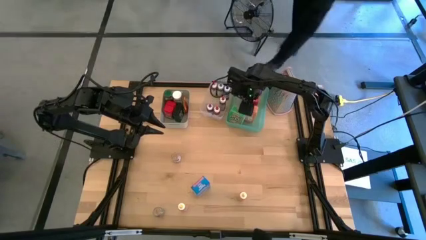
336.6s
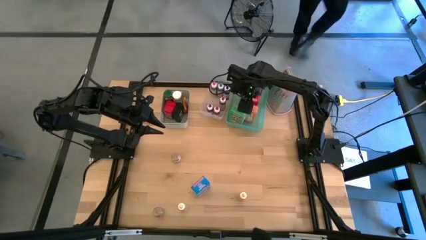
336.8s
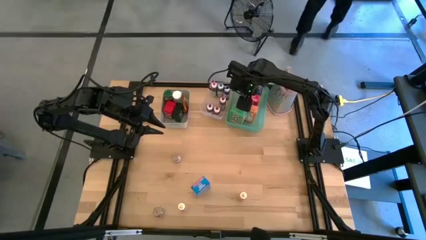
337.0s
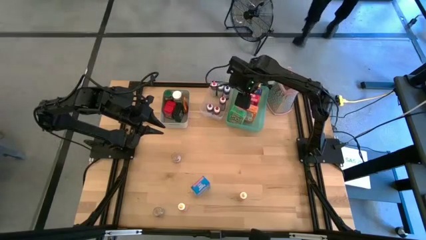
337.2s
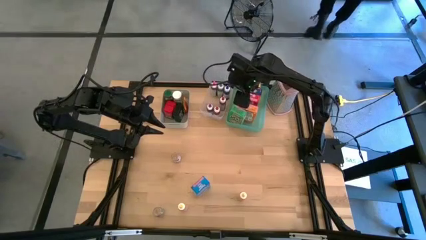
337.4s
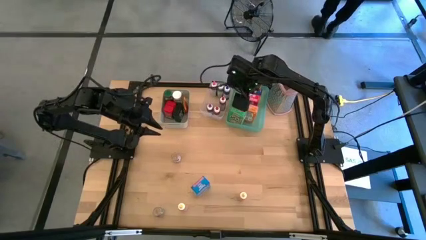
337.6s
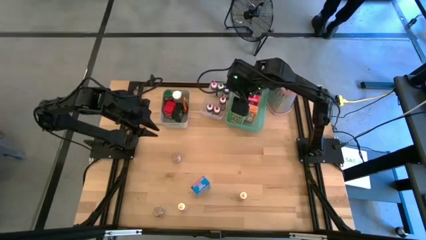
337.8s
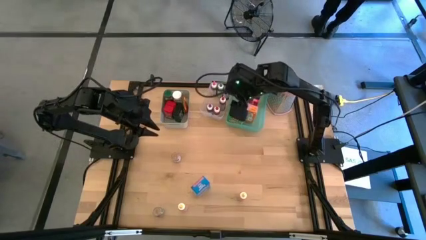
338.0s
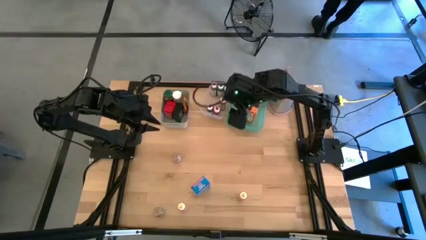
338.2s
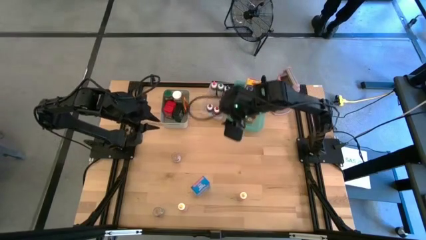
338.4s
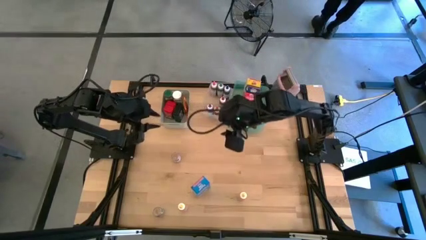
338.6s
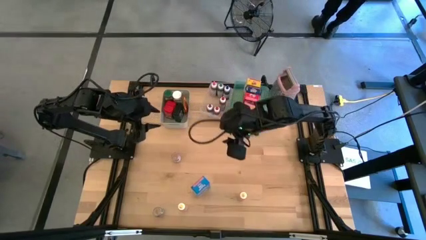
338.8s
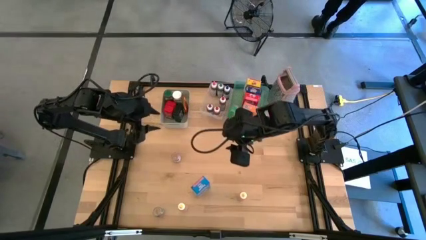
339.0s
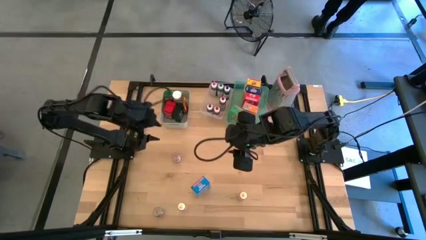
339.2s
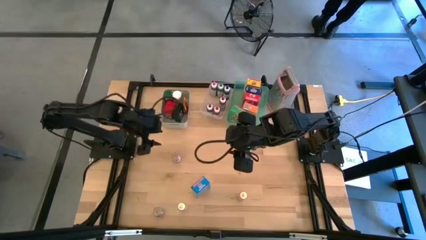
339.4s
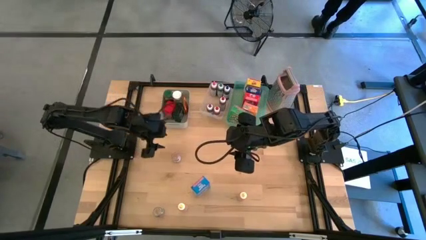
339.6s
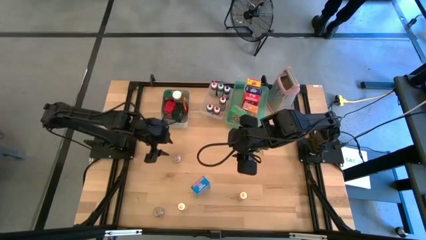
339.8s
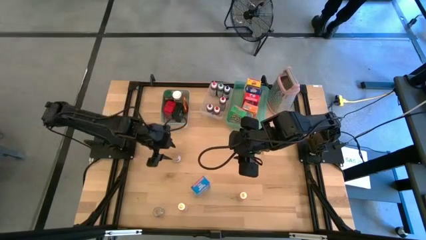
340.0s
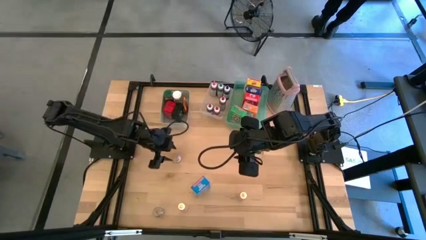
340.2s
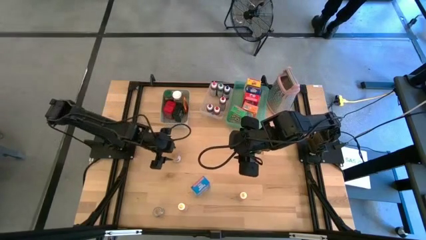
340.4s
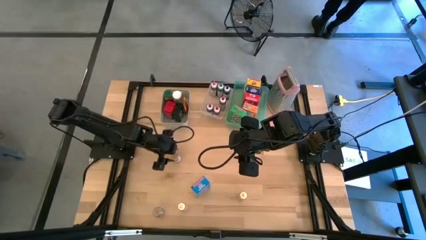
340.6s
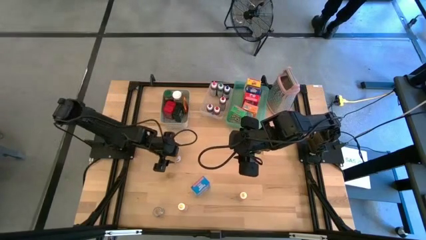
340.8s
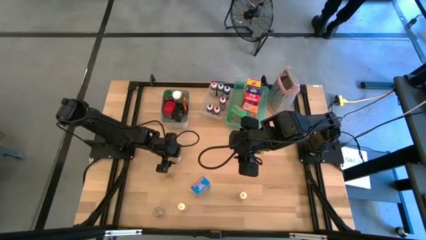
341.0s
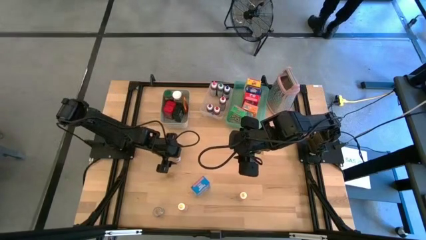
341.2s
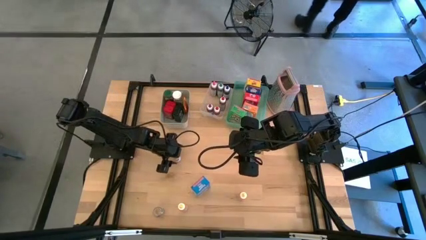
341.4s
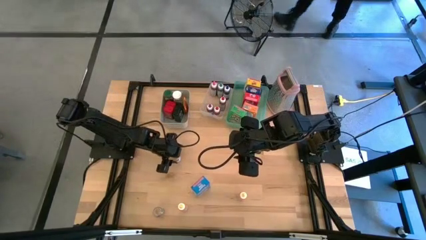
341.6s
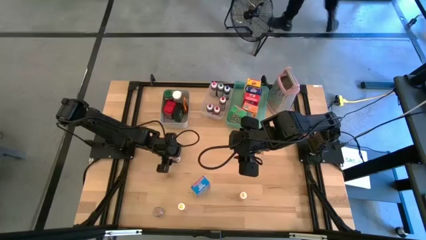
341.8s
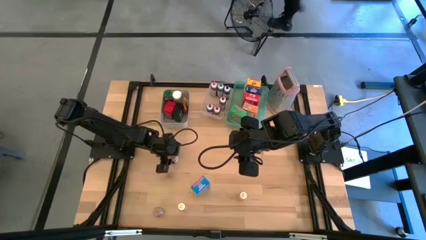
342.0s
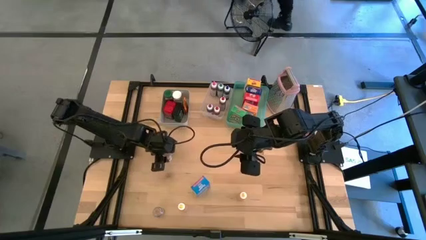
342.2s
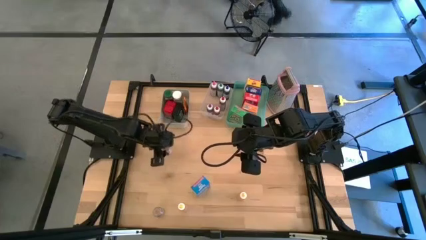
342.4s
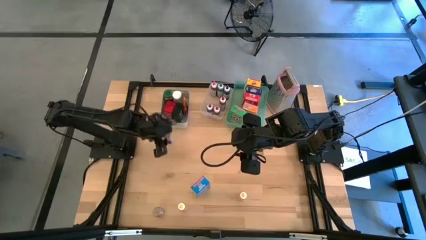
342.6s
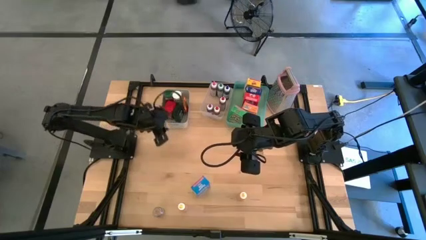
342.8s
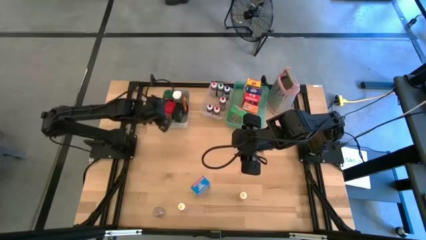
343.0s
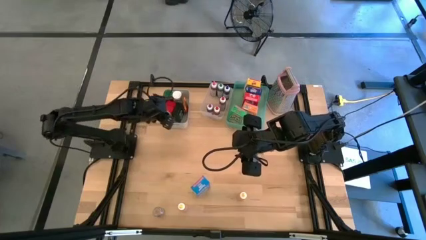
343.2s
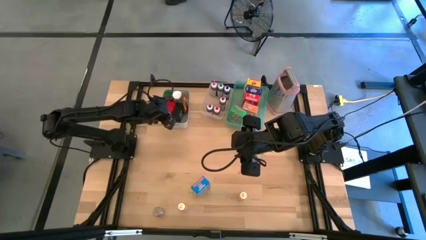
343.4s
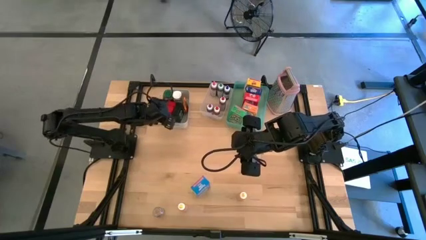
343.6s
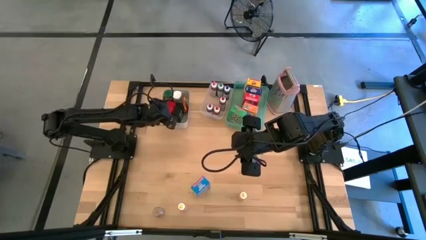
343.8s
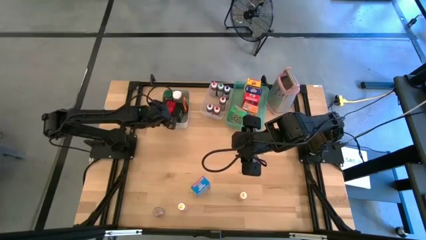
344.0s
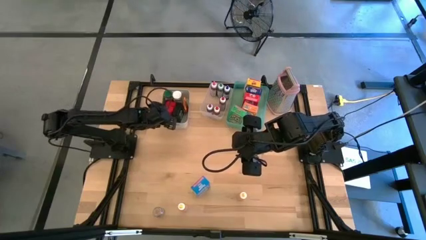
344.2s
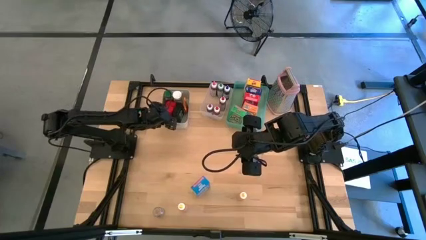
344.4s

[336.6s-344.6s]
Task: Pick & Place Kitchen Items
Put the top brown seasoning bottle into the gray bin

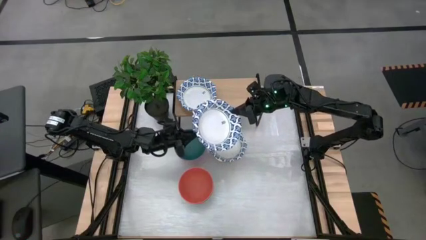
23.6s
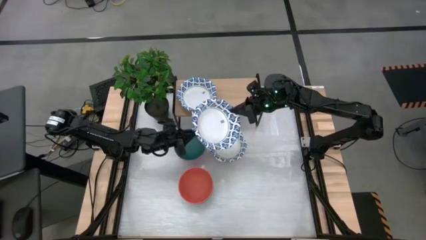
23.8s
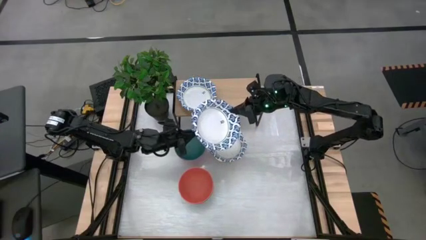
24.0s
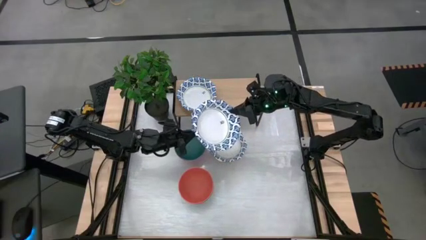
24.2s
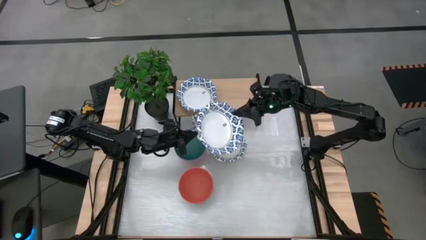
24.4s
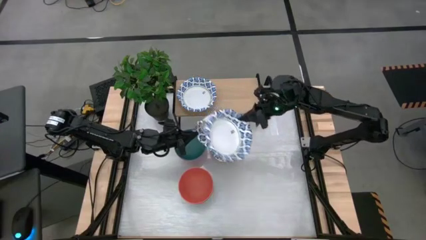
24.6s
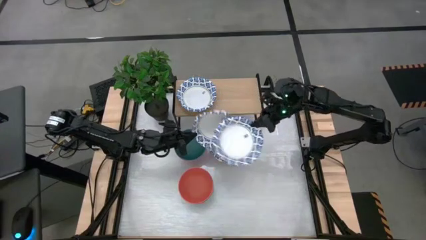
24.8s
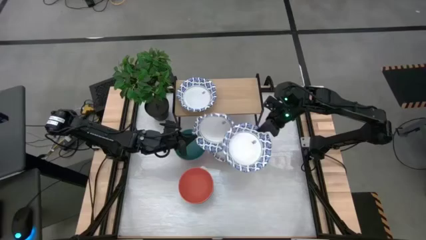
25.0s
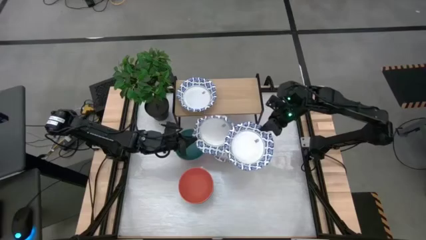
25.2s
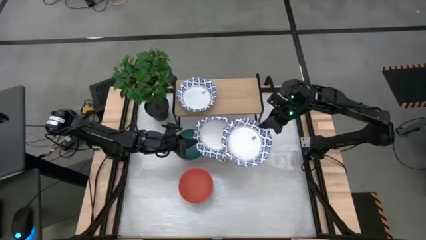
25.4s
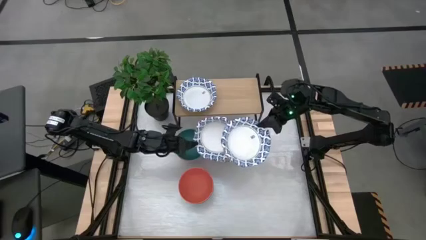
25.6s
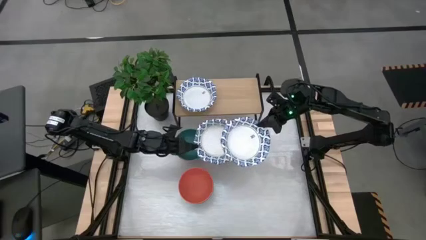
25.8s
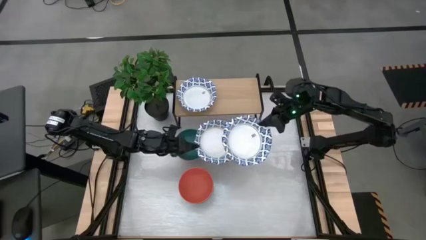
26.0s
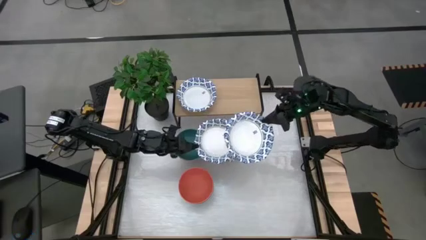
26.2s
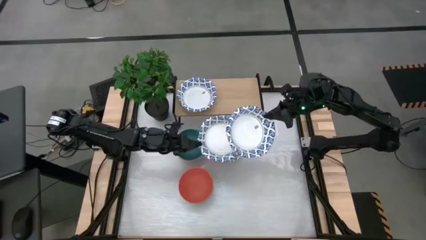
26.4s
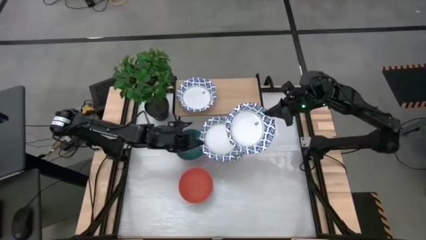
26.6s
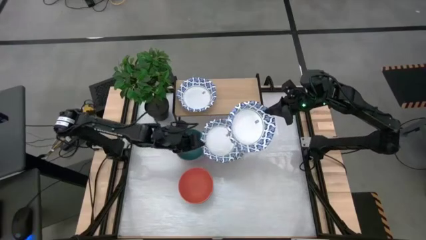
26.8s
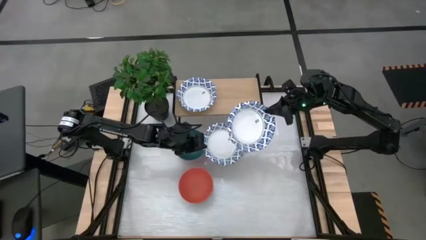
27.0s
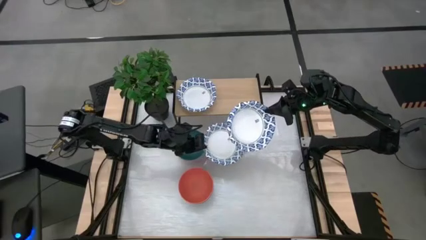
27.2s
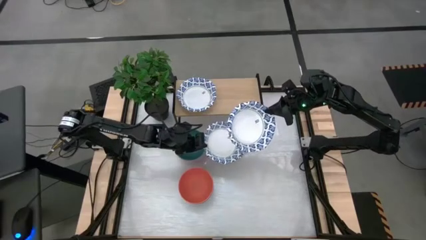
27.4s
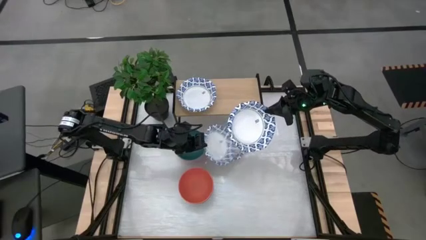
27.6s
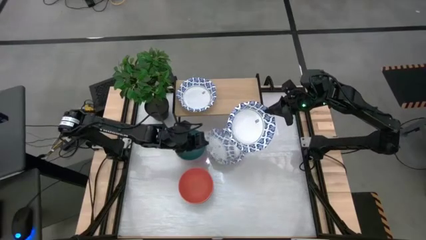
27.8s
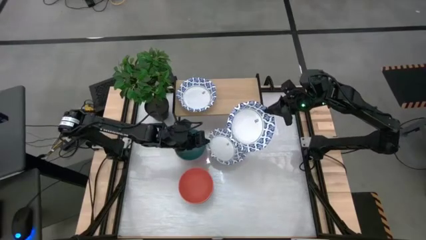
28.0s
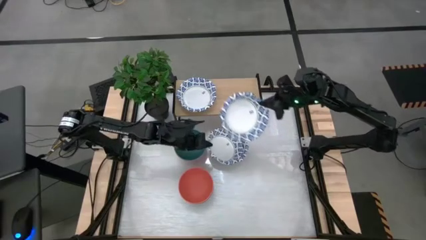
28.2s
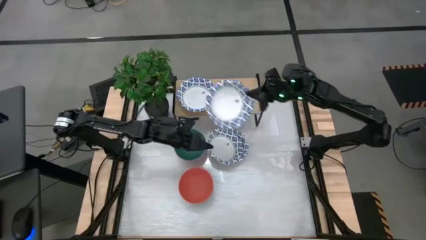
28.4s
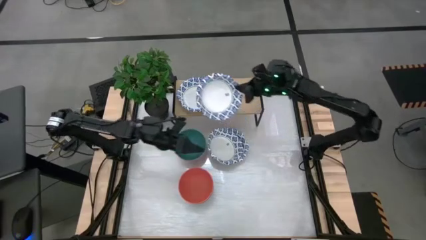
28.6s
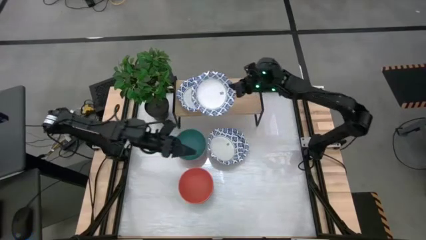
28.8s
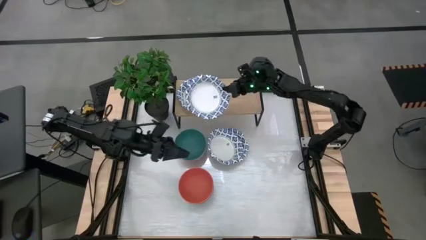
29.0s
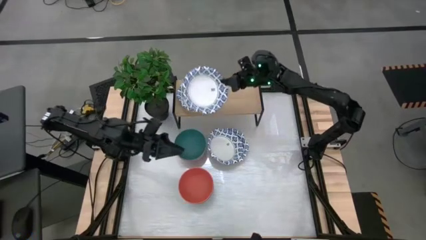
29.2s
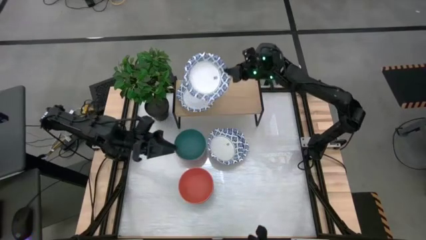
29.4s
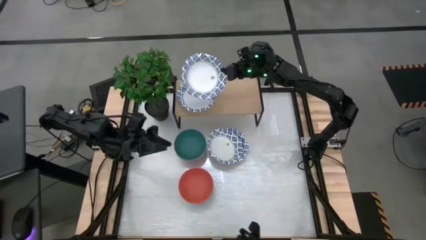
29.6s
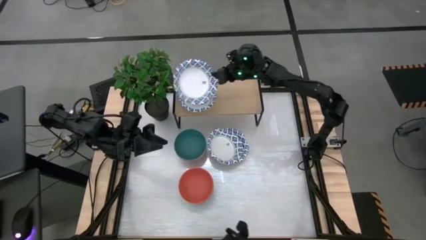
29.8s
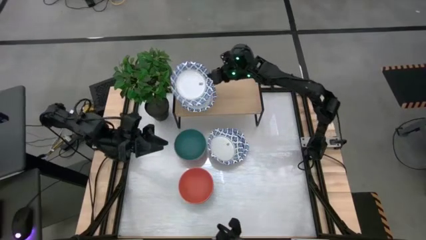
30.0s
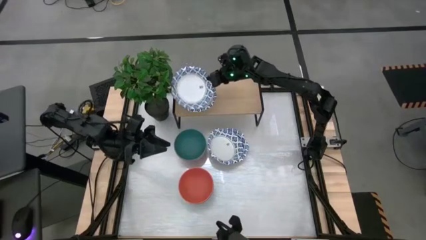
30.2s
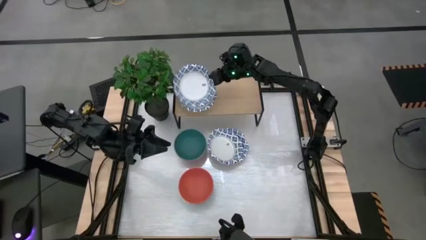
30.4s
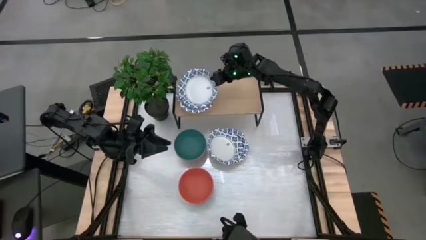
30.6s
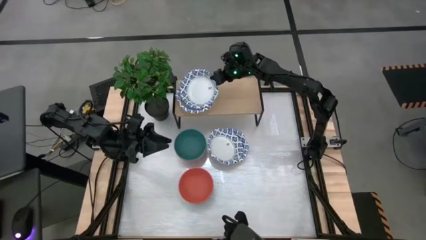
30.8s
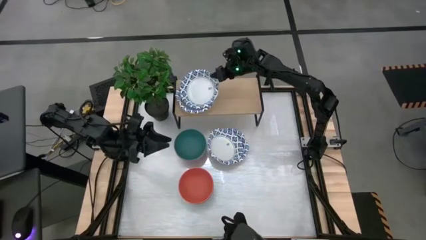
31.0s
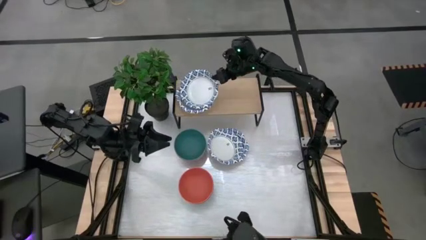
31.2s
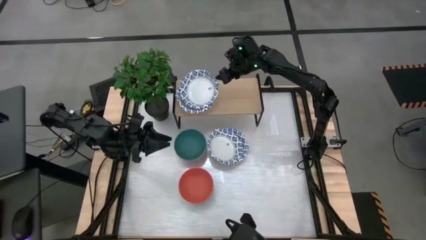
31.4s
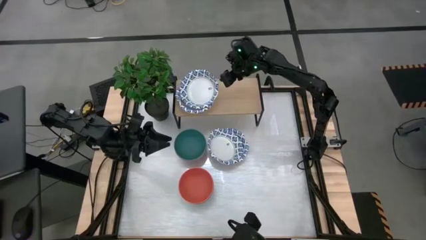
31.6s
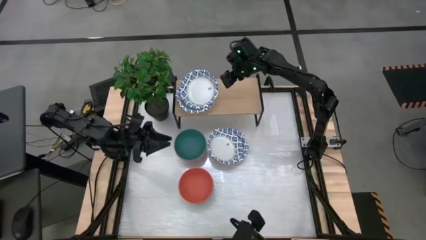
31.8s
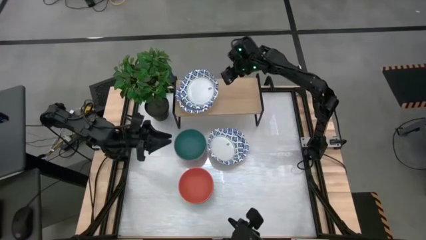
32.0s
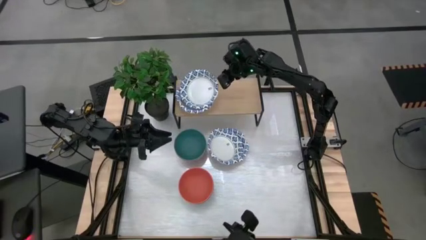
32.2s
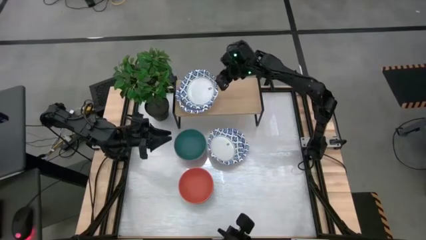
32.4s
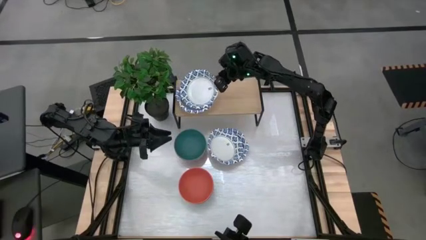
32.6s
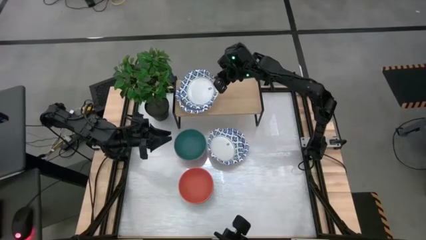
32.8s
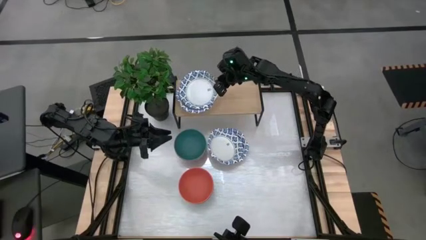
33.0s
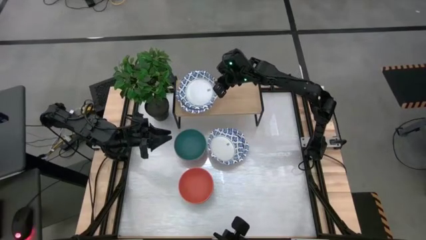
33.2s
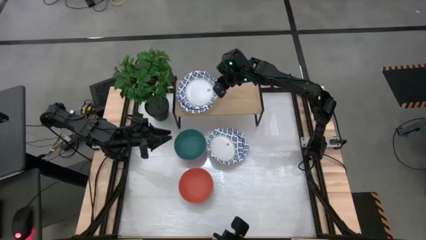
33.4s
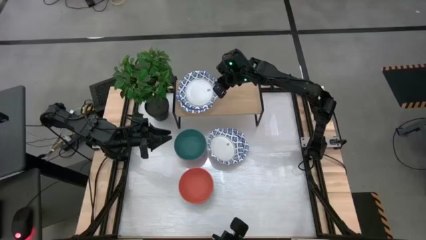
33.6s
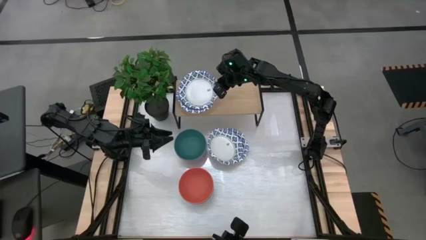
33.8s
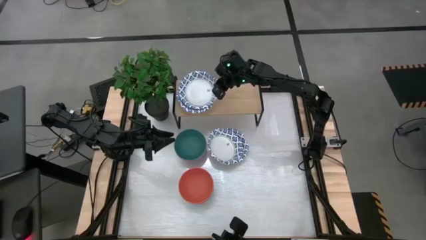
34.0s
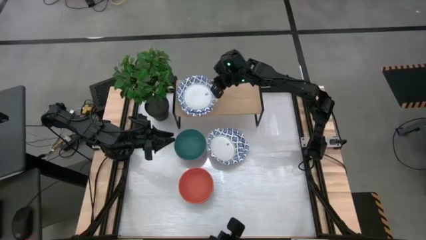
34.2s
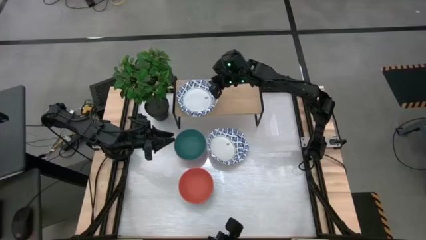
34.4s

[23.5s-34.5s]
Task: Place and stack bowls onto a shelf
Stack the white bowl on top of the white bowl on the shelf
